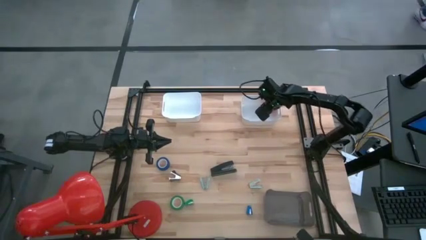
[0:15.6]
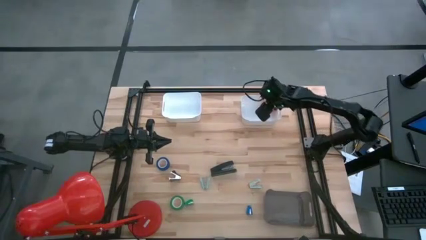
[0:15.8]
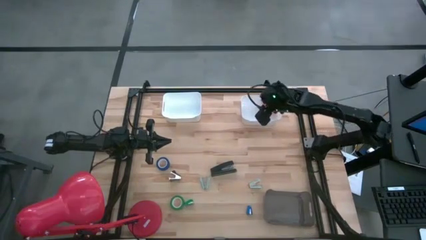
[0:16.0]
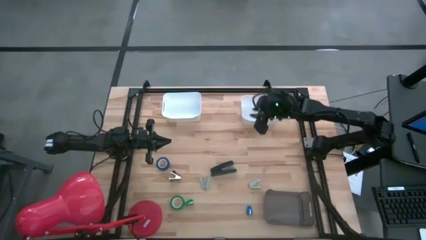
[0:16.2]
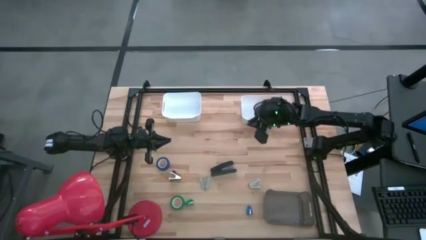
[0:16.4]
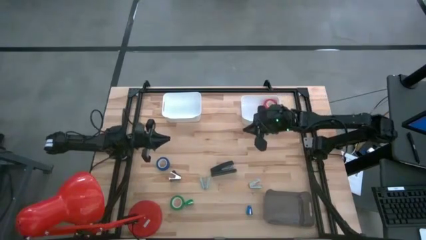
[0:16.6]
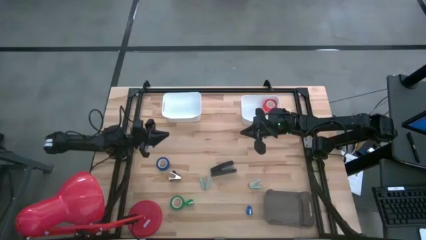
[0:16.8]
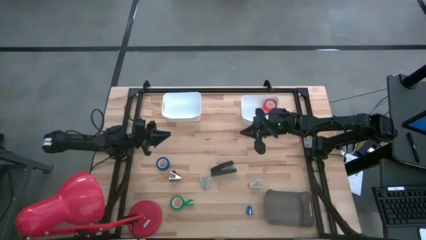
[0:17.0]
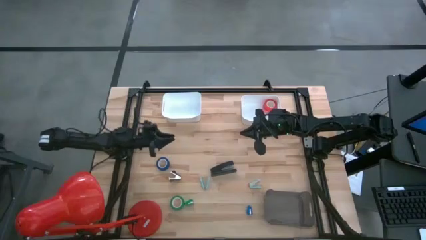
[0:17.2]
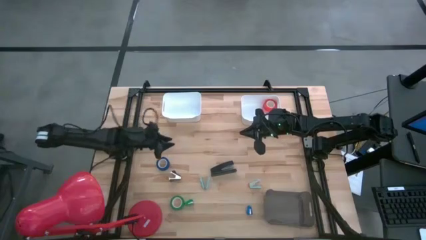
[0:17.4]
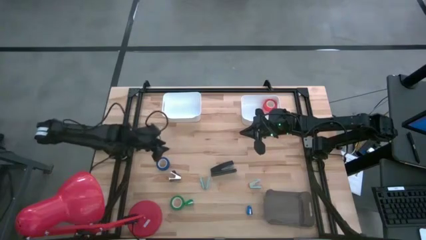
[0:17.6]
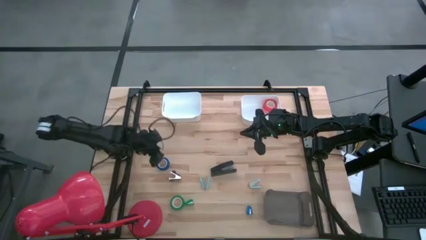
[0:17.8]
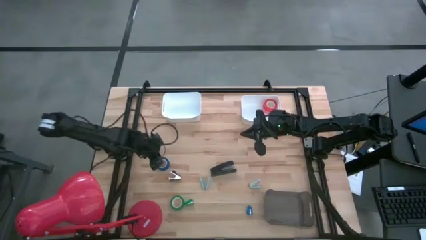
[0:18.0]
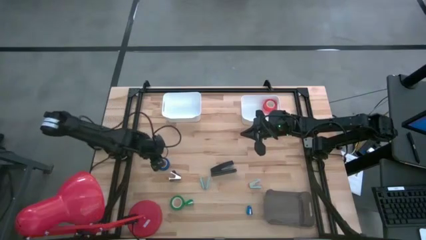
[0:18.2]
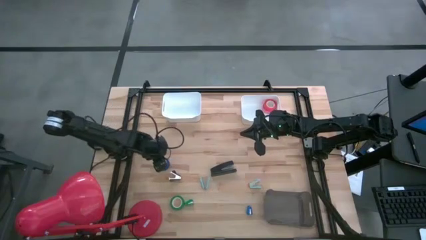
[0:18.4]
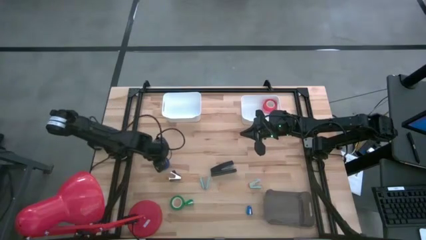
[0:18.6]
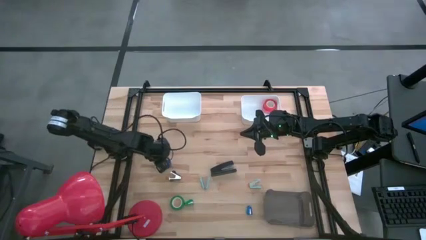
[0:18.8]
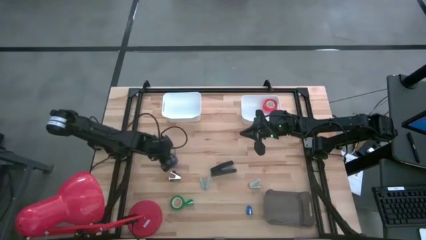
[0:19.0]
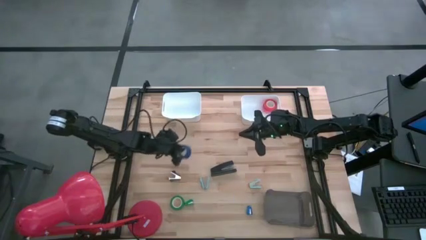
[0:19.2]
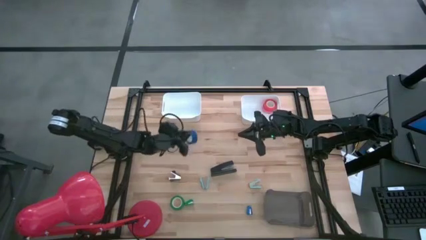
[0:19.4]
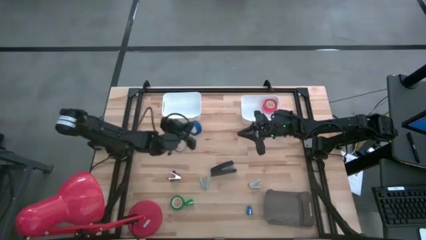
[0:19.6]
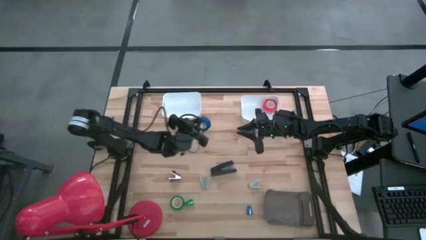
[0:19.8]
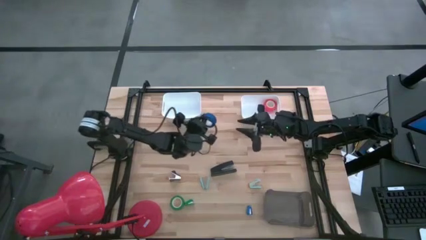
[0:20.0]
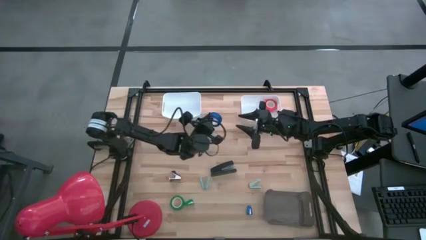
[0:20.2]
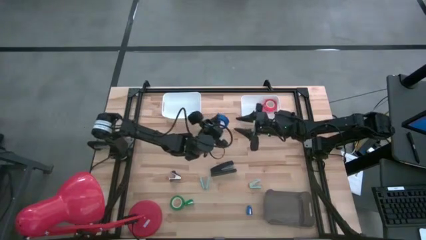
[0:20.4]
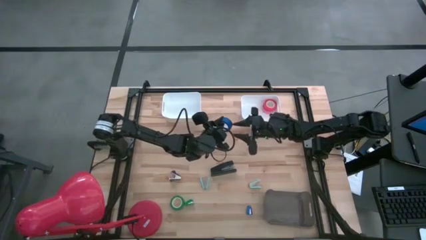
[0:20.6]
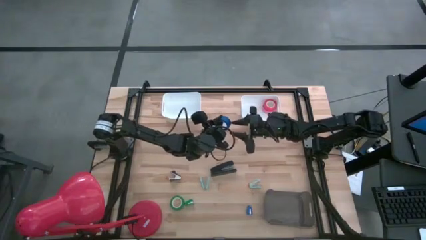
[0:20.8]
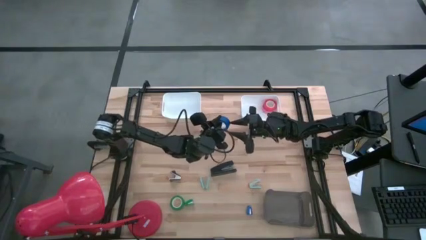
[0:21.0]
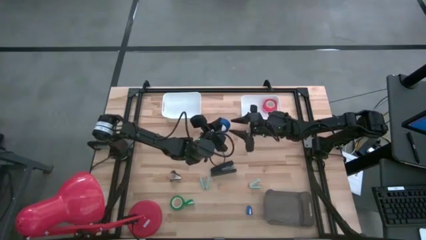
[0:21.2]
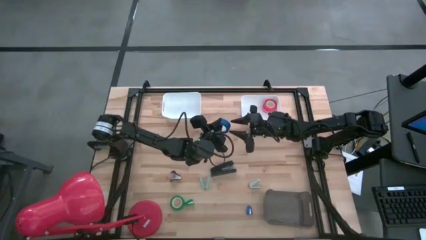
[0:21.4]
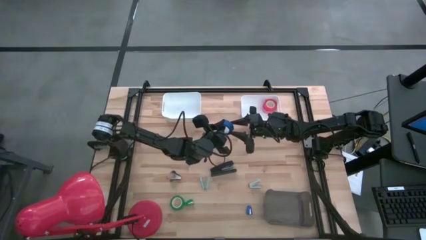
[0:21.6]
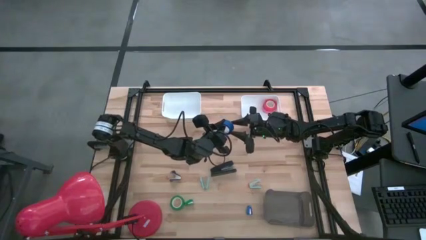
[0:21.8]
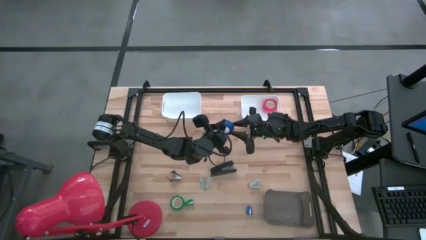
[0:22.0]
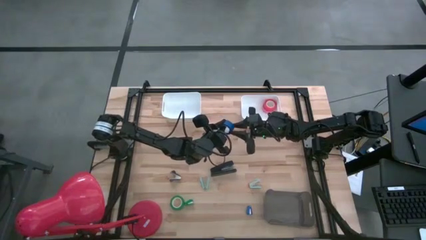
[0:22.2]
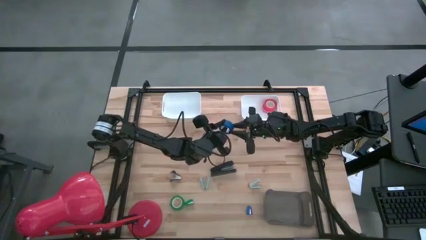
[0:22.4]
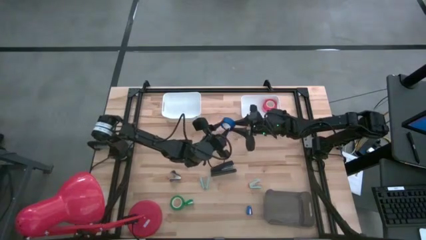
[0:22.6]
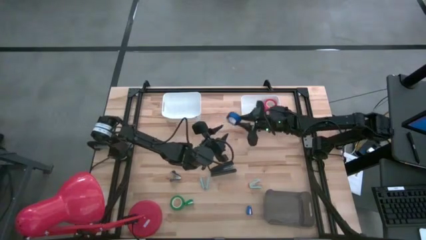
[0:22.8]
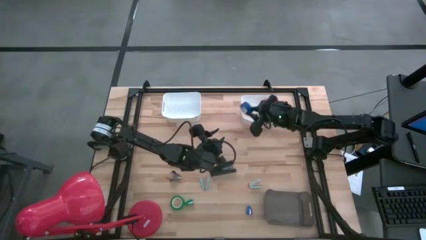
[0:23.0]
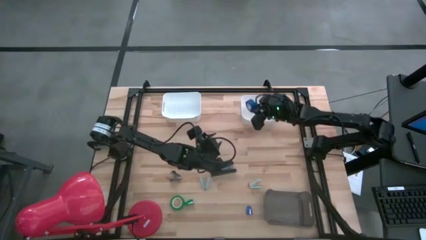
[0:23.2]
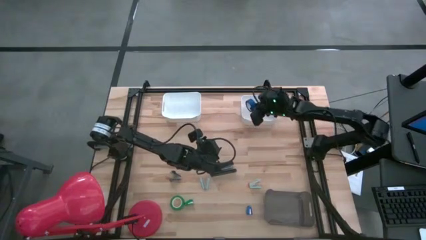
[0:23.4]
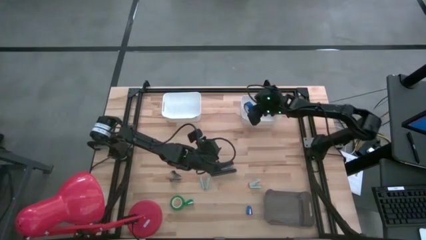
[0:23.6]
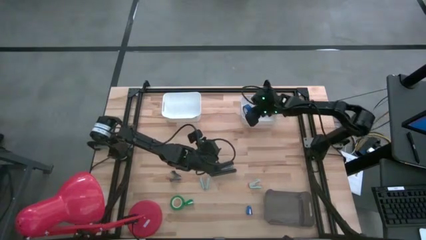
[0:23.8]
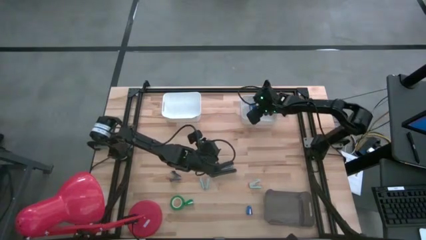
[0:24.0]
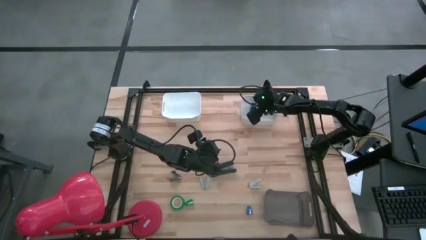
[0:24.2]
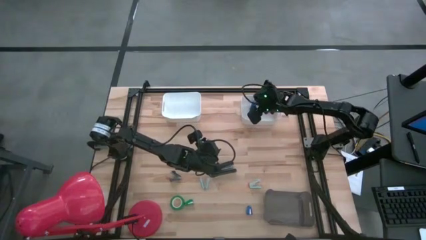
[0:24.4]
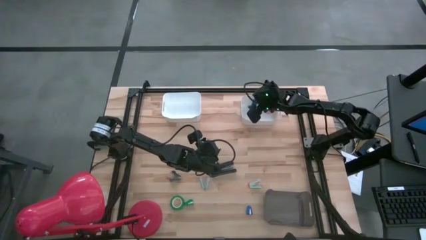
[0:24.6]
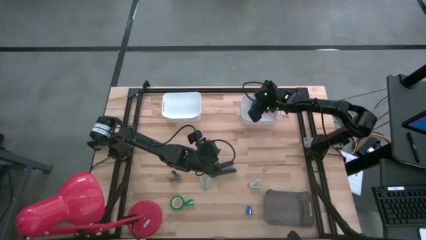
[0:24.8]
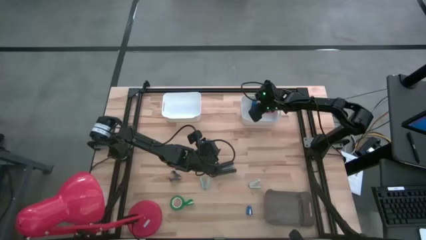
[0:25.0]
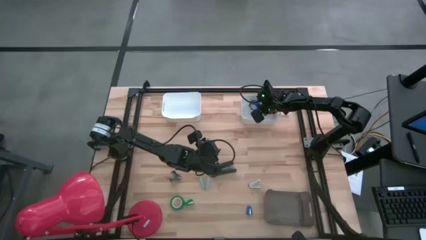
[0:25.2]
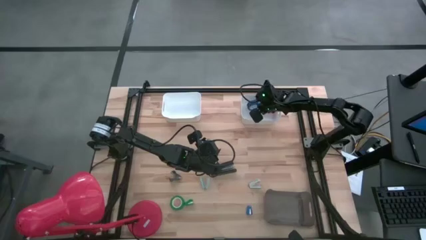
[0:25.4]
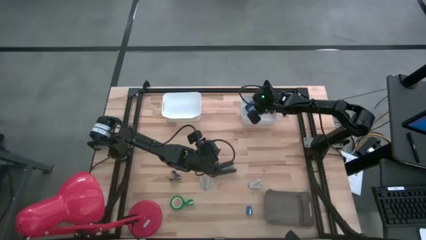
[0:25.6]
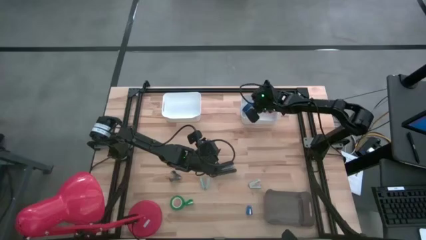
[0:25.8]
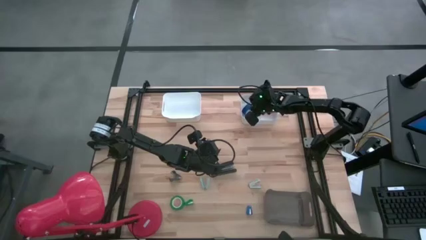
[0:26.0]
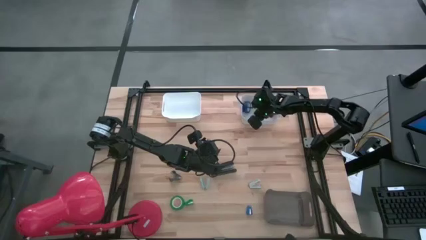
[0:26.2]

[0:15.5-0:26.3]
Task: Pick and place Stapler, Stapler remover, tape
Put the blue tape into the right white bin

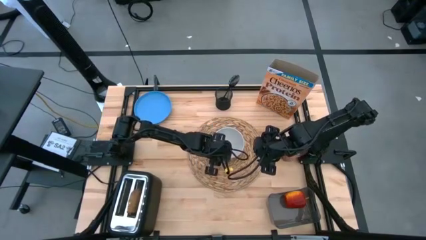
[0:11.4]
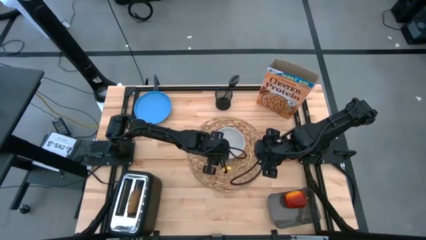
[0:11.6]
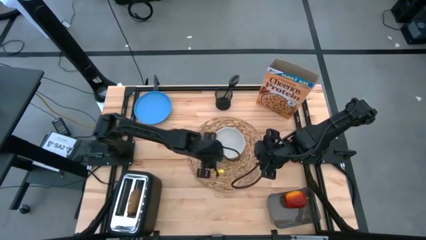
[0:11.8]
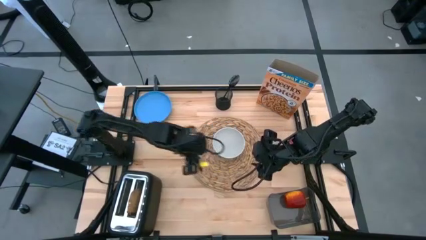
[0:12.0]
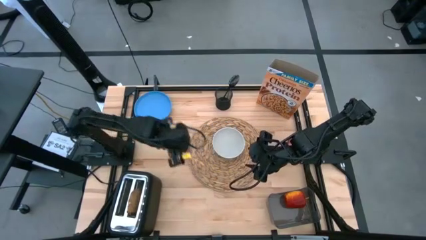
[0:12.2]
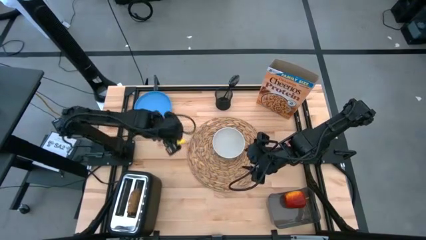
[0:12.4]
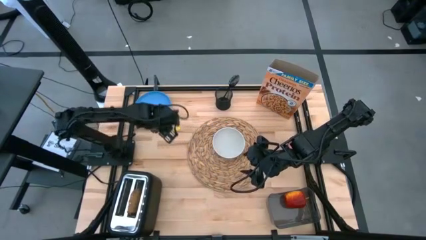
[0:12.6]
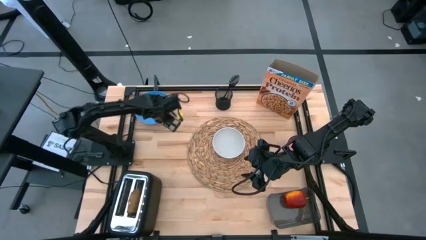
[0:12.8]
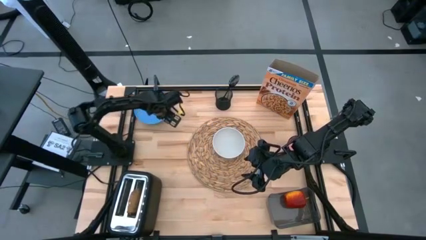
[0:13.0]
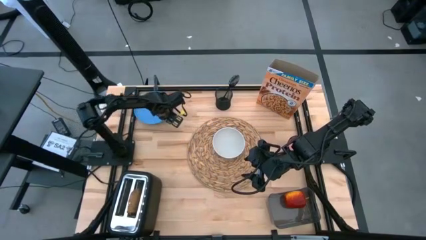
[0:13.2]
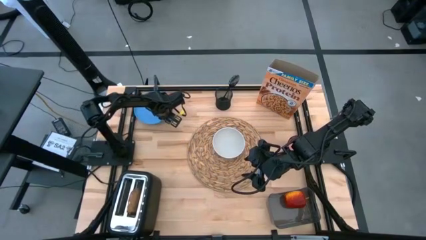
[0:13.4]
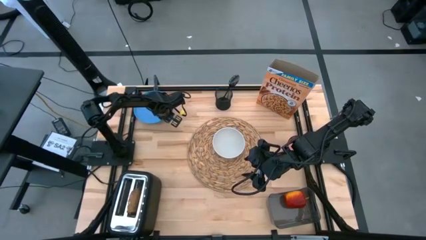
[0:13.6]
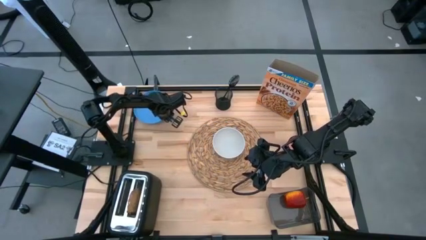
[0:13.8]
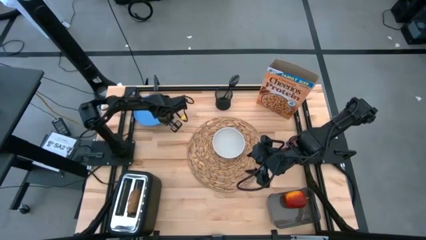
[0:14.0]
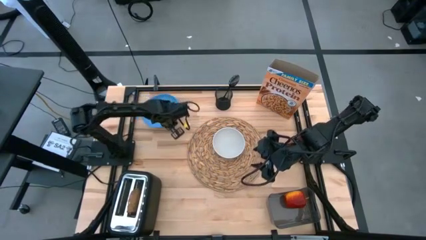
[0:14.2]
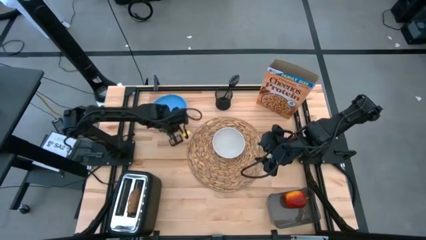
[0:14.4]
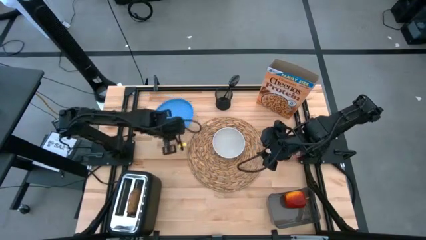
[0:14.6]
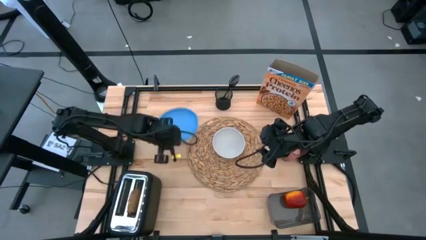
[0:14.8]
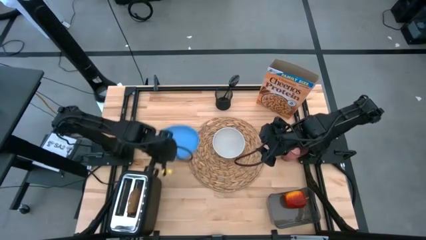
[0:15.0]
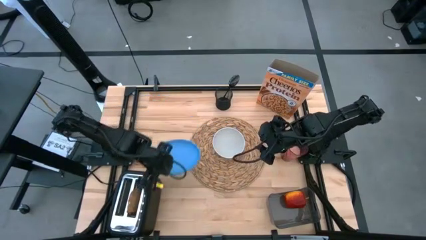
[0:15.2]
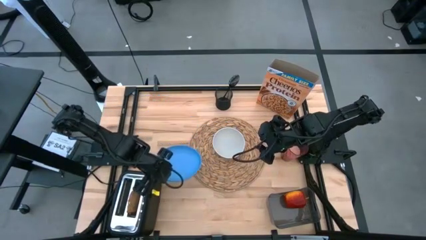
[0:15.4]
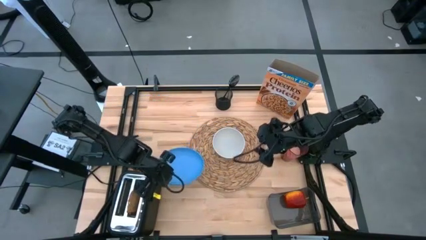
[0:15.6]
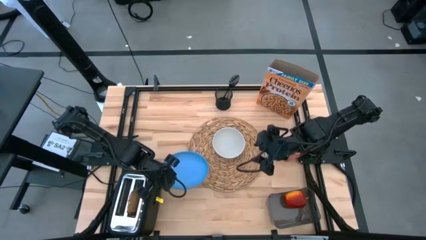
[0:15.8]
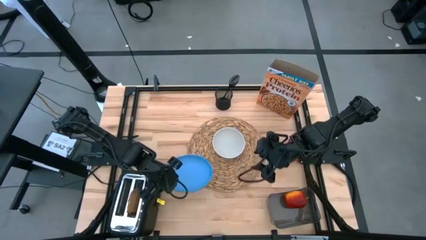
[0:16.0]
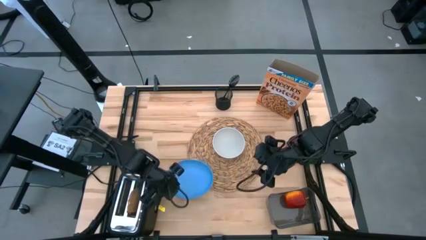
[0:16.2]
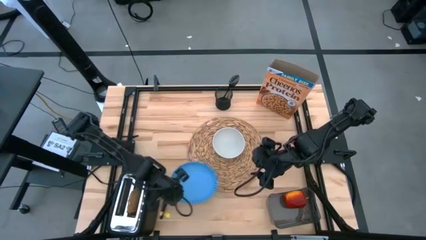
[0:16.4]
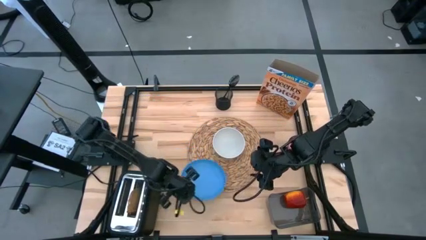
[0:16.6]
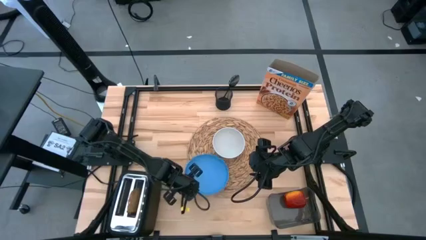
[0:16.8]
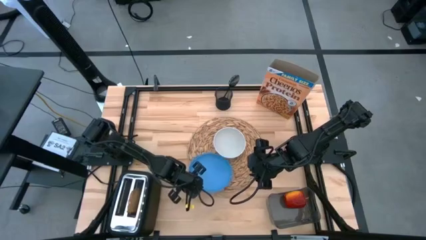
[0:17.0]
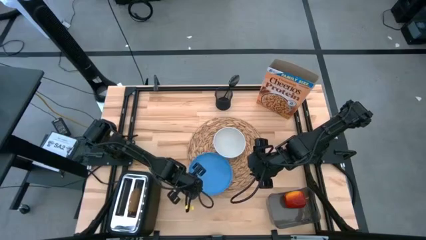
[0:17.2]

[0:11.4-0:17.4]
Task: Arrange a breakfast setting
Put the blue plate on the brown placemat to the bottom left of the white bowl
